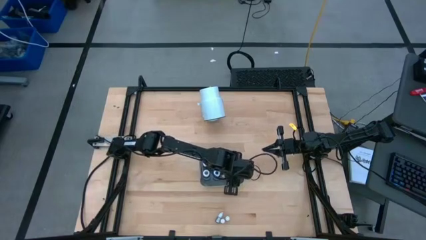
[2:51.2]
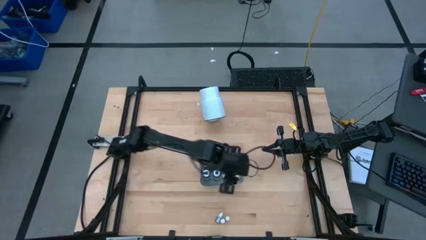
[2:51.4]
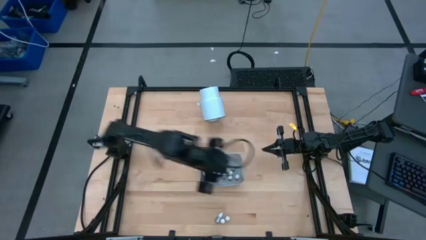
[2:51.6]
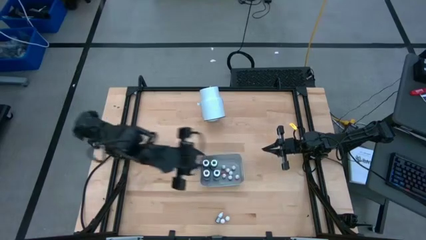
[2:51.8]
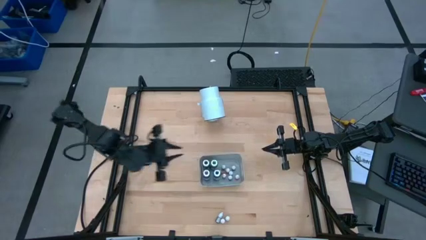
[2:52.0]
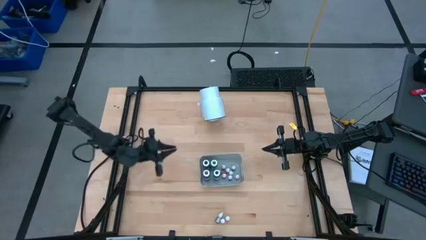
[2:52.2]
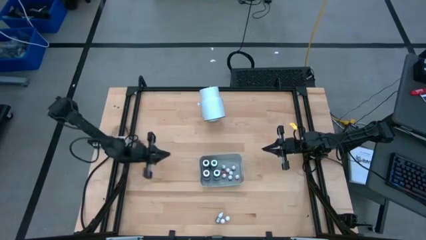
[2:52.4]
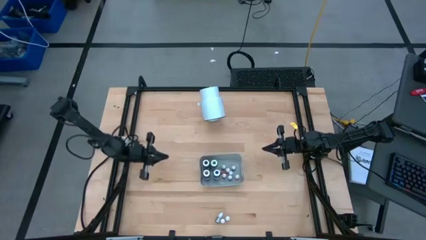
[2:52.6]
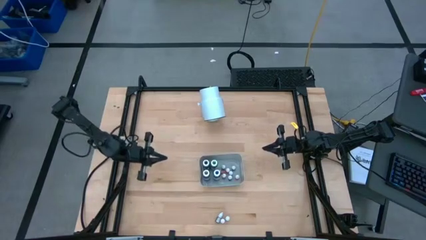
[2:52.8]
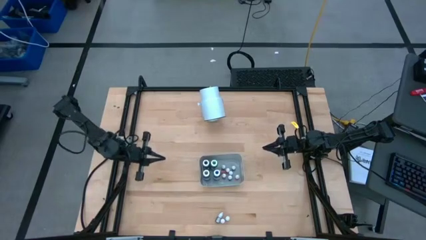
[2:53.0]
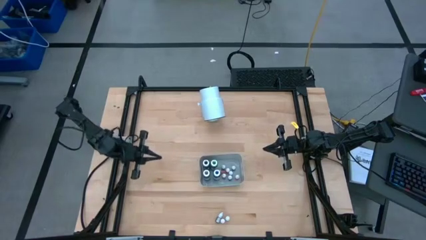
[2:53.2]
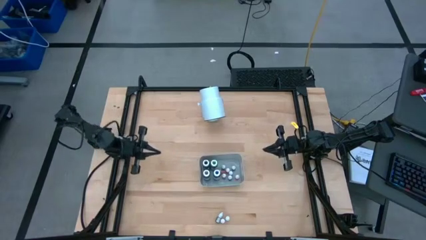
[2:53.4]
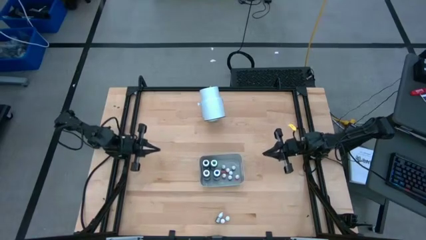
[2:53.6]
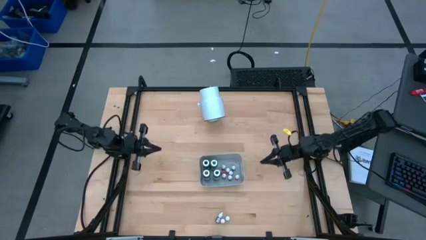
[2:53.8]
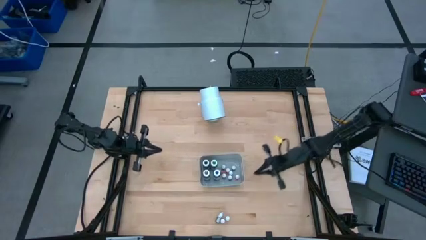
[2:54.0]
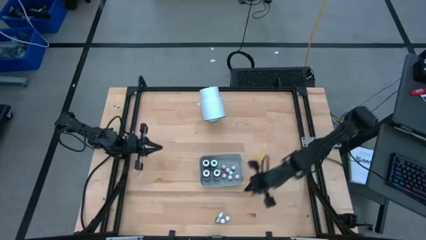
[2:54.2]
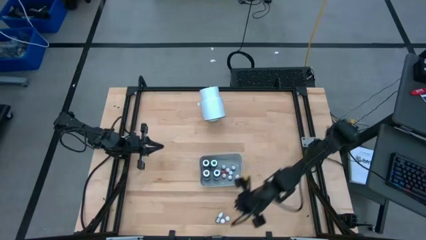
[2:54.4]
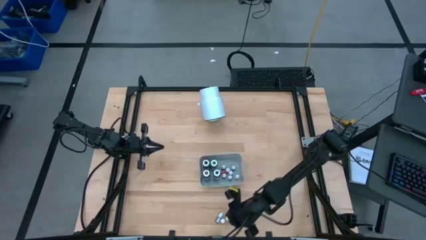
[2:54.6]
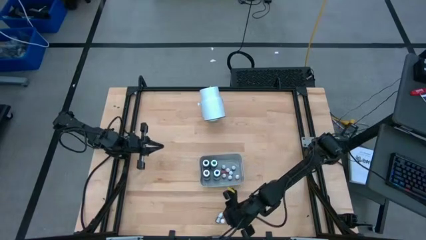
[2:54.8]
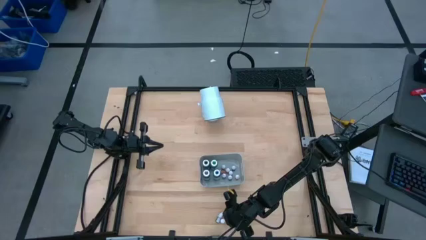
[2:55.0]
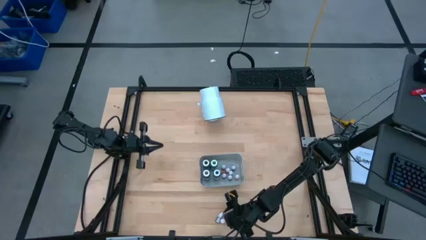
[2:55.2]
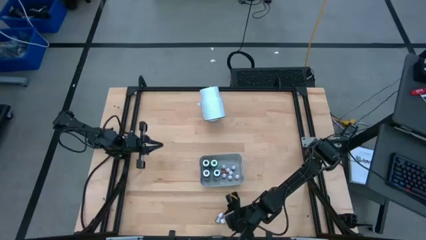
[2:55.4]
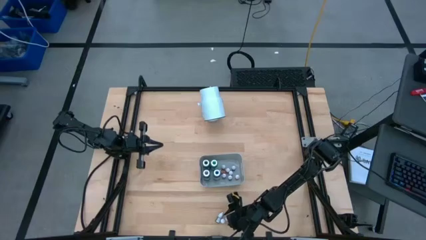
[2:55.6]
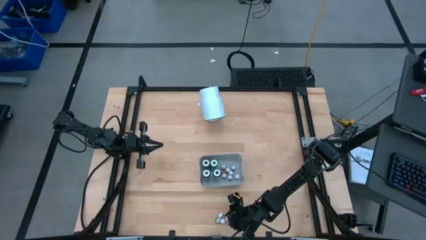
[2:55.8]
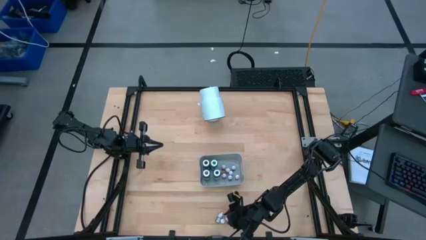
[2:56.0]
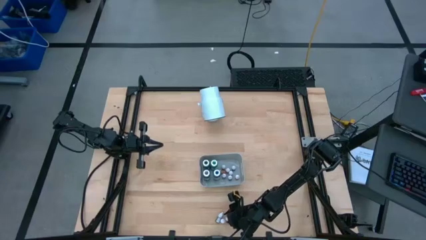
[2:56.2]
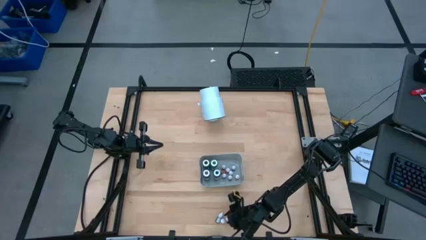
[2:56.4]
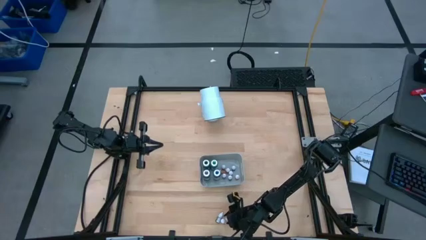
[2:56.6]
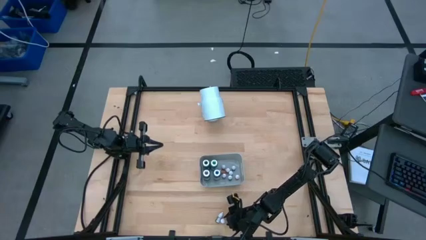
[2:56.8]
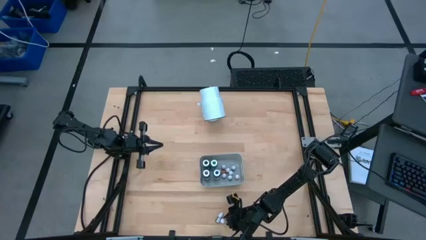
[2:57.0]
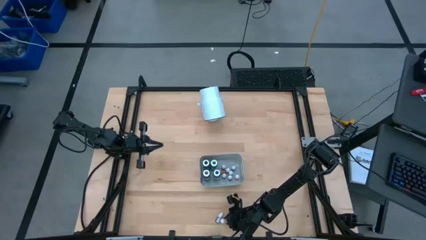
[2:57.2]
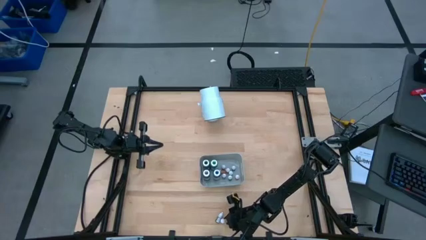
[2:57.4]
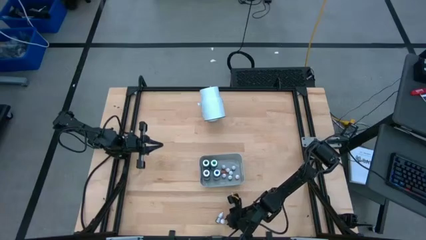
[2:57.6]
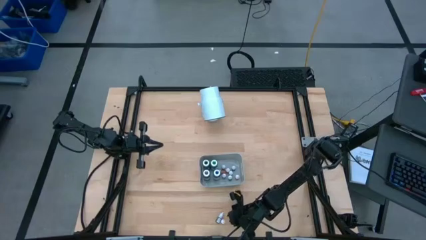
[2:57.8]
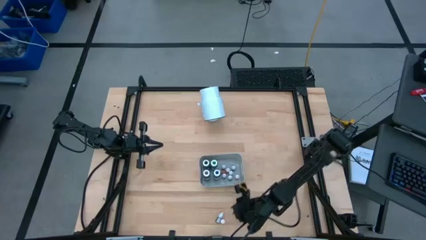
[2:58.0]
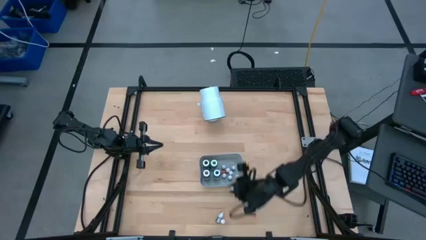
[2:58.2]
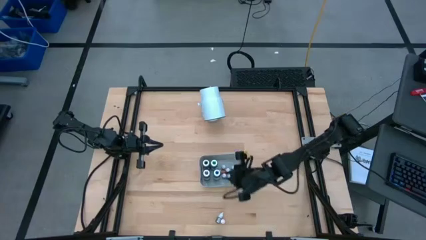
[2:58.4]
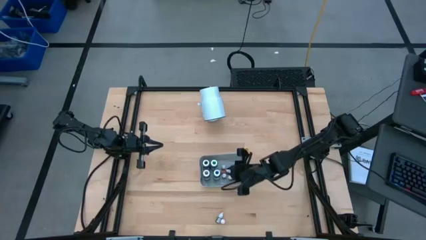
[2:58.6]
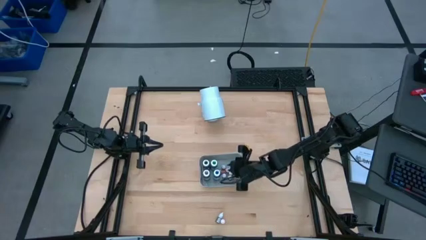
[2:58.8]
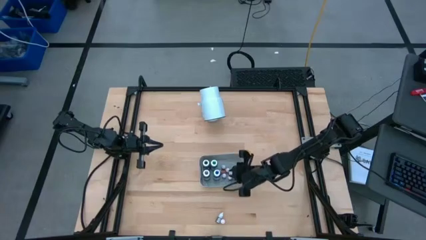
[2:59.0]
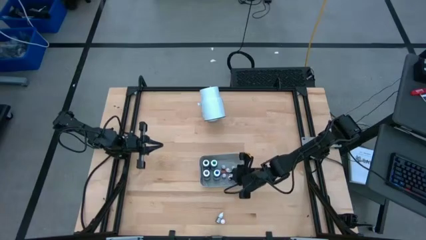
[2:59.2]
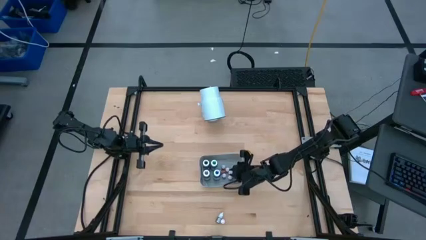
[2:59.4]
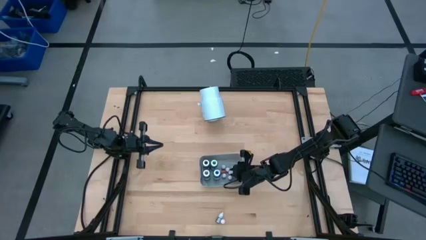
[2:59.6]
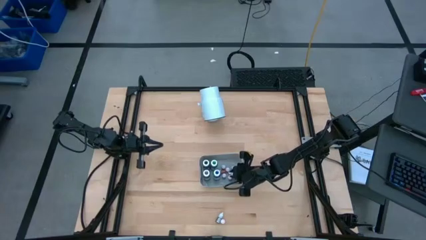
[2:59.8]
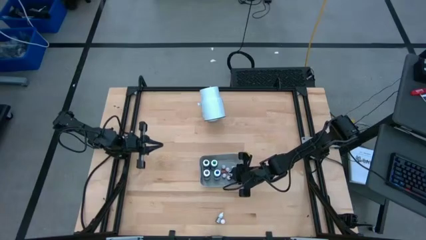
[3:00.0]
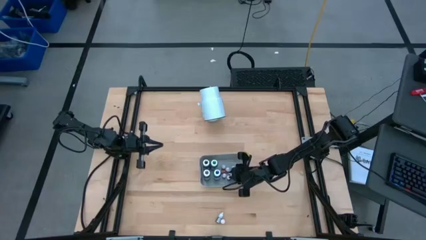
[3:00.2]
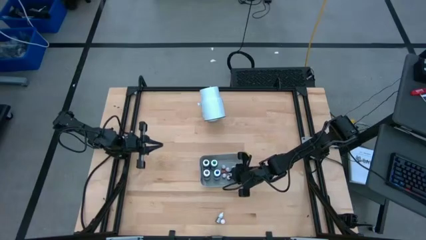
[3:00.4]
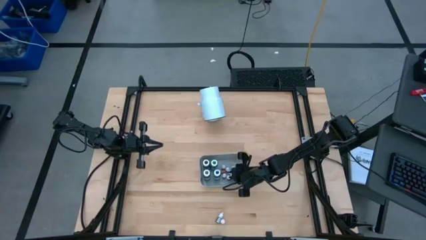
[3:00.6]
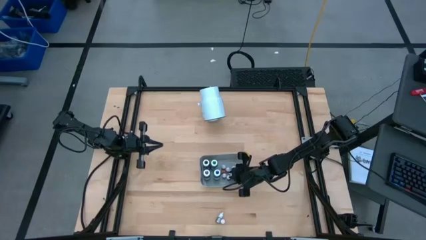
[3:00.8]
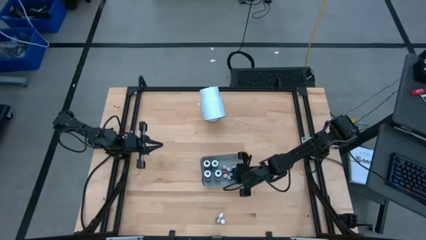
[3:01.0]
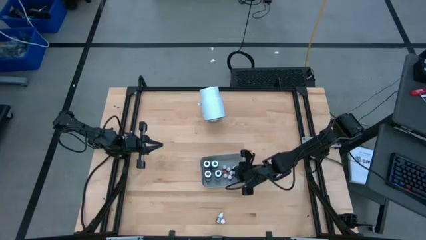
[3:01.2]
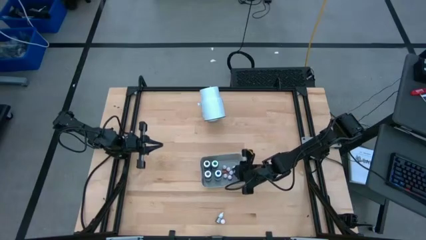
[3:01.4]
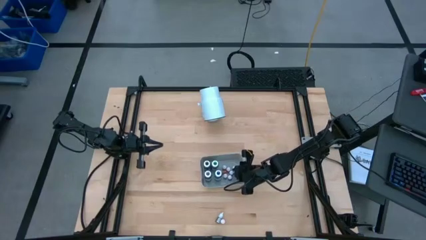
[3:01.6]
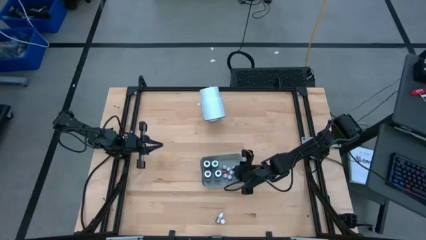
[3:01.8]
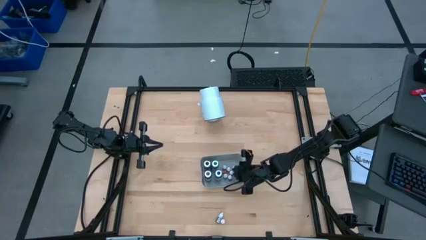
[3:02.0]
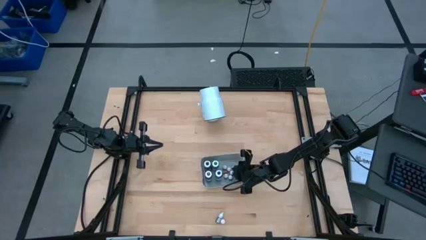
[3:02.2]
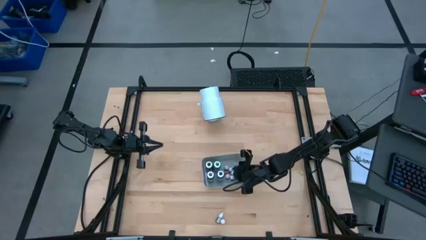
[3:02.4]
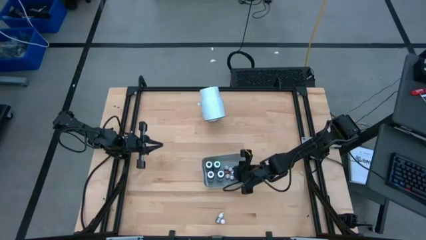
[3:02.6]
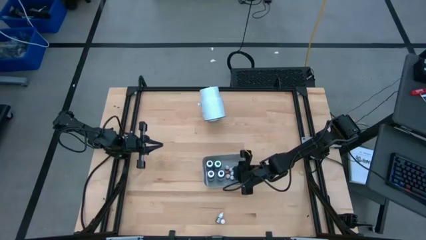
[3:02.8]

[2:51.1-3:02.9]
Task: Pick & Place food coloring
Put the small violet food coloring into the gray bin

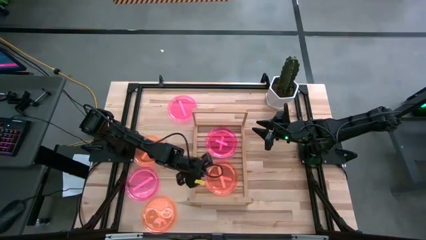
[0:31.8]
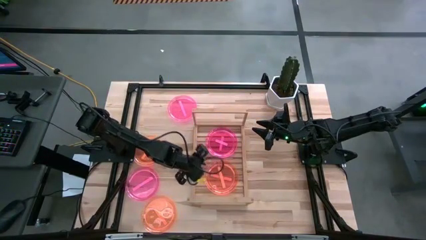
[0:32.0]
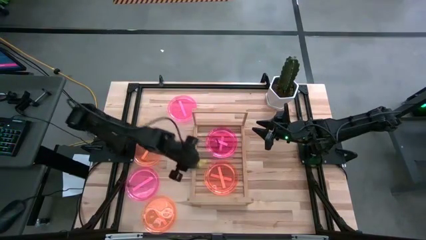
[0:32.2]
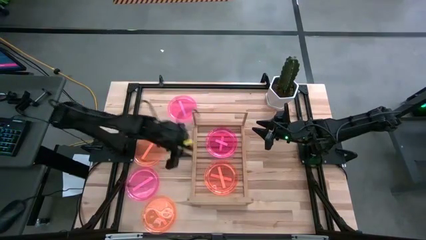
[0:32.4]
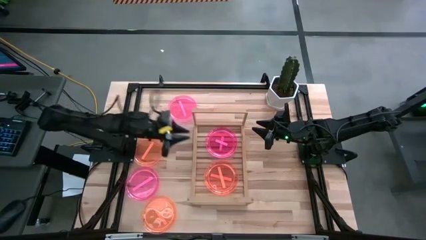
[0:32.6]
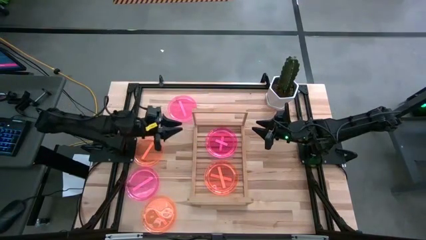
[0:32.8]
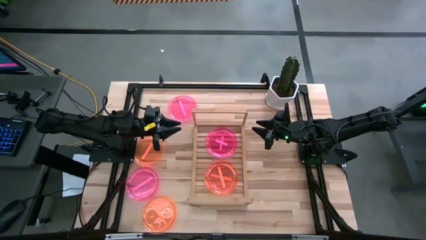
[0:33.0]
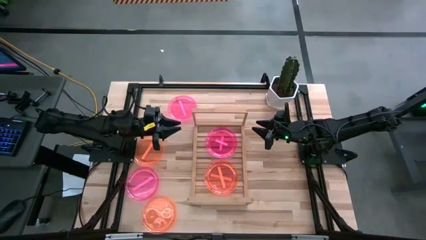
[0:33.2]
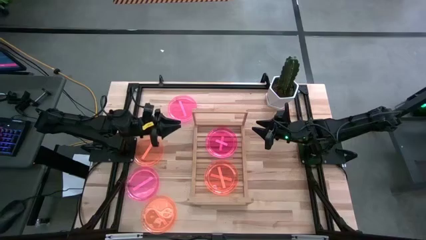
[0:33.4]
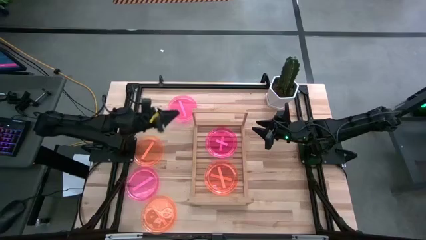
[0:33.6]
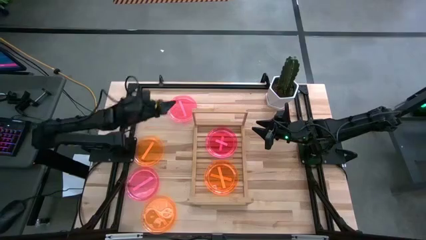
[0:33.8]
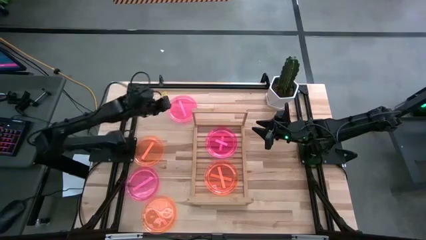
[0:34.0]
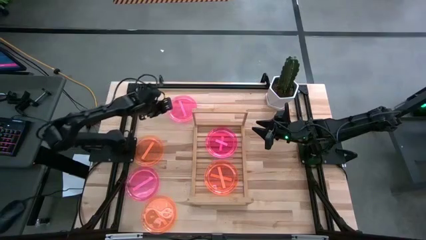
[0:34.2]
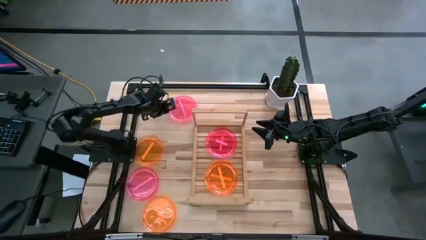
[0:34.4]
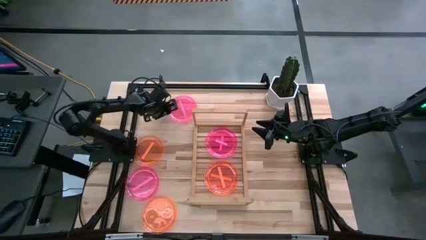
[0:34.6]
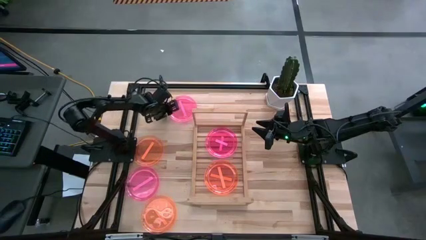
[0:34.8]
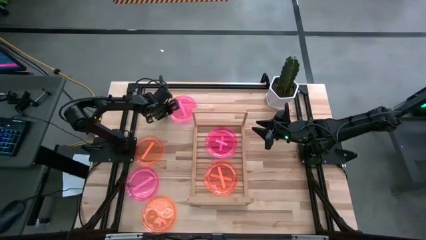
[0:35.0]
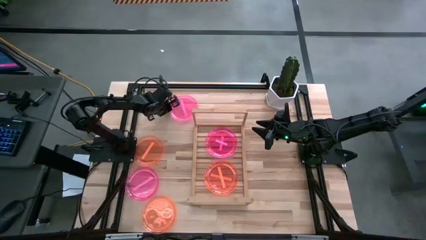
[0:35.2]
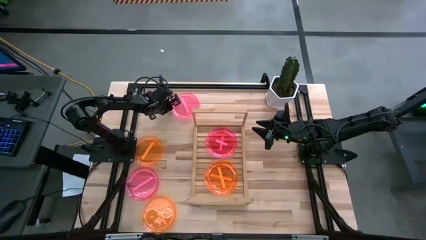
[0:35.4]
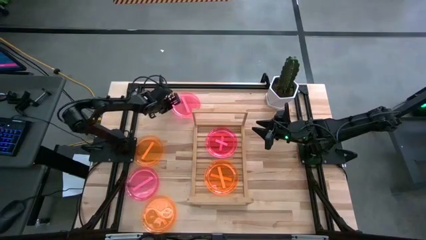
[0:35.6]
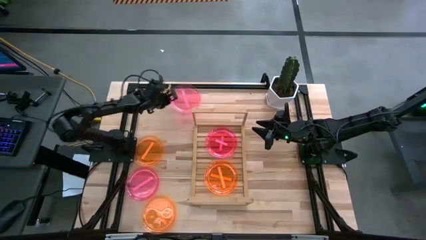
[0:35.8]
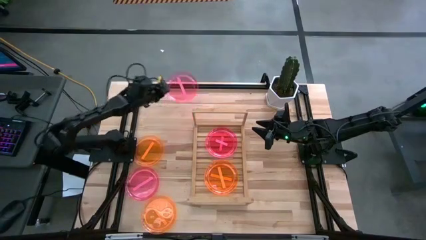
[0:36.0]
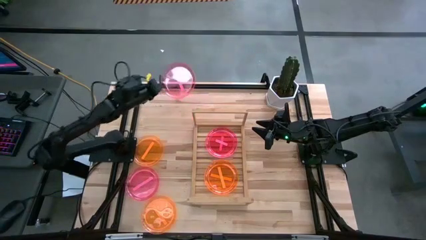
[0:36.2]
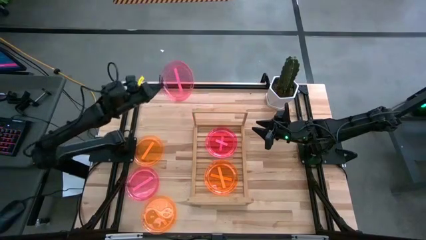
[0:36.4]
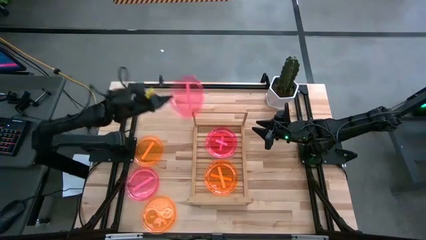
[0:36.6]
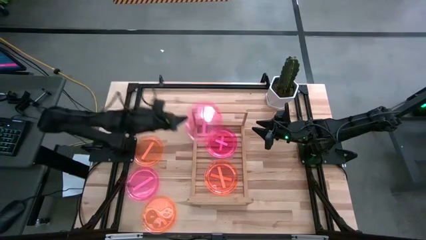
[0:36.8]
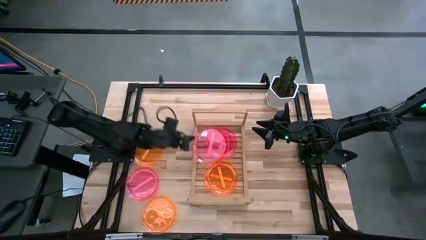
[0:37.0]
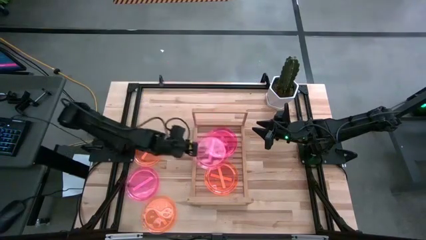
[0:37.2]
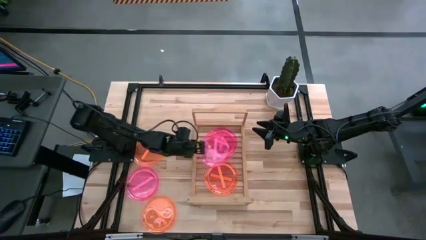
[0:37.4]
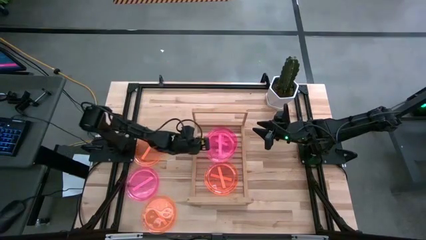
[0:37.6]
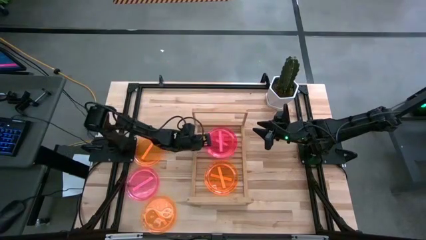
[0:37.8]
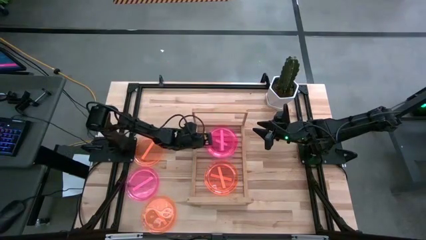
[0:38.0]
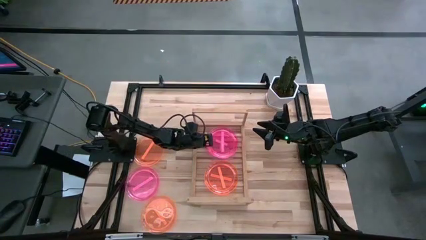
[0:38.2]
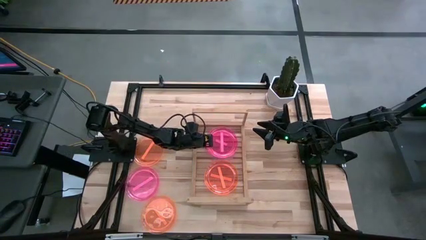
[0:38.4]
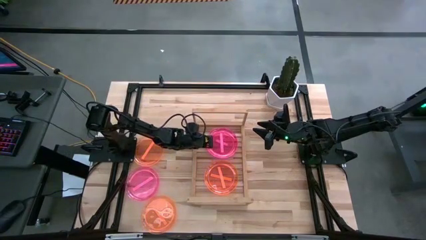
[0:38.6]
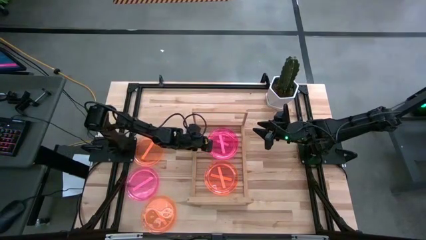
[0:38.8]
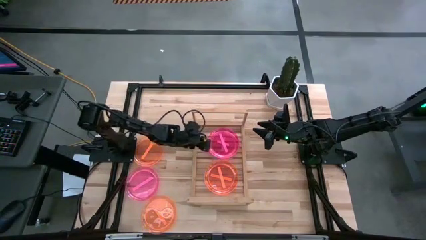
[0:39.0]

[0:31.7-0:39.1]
Task: Place and stack plates onto a shelf
Stack the pink plate on top of the pink plate on the shelf
